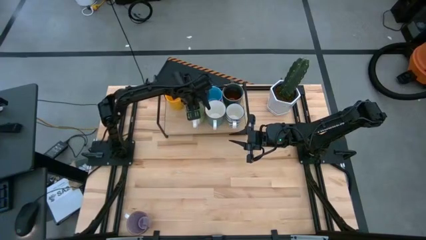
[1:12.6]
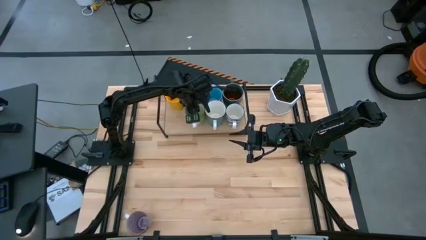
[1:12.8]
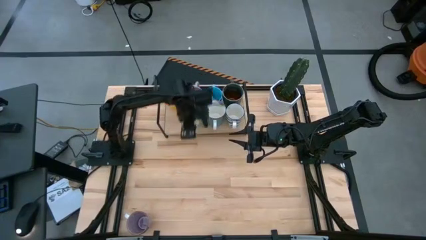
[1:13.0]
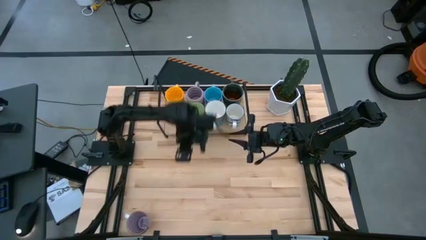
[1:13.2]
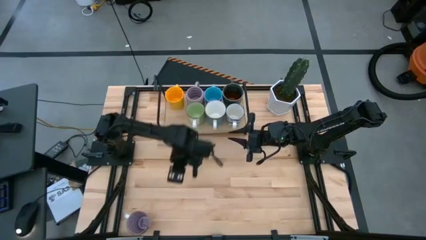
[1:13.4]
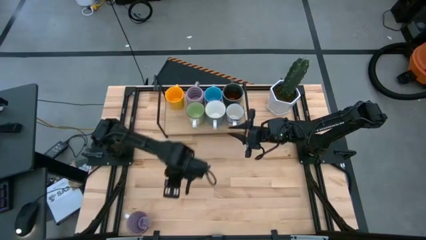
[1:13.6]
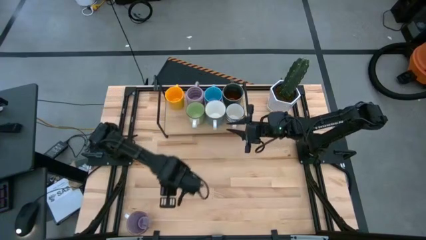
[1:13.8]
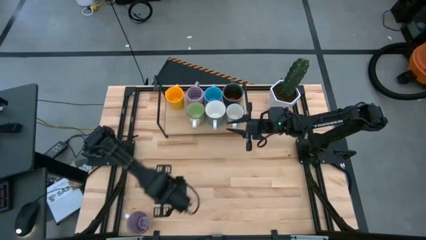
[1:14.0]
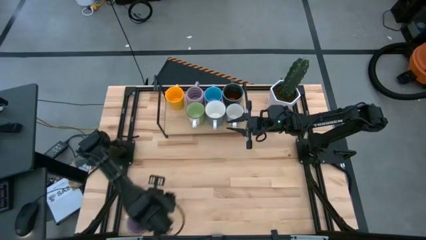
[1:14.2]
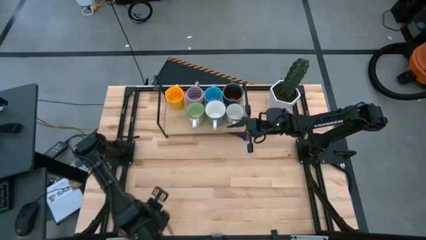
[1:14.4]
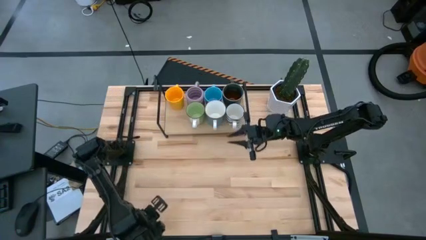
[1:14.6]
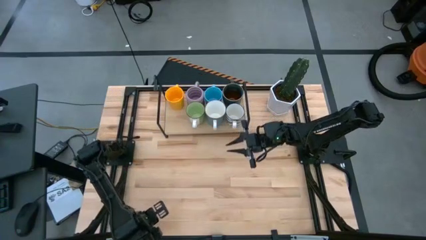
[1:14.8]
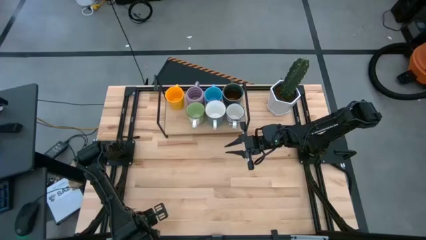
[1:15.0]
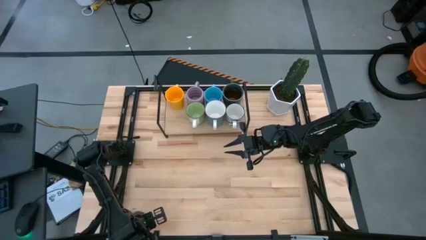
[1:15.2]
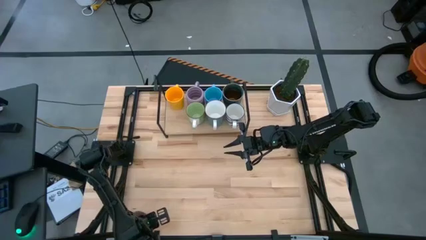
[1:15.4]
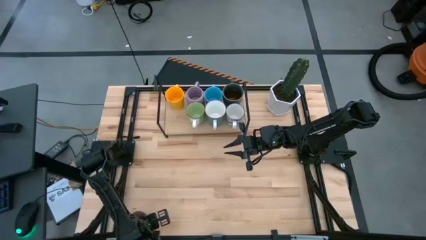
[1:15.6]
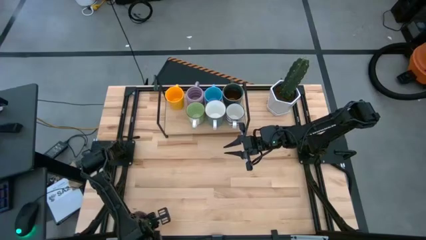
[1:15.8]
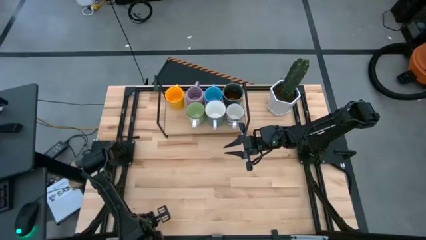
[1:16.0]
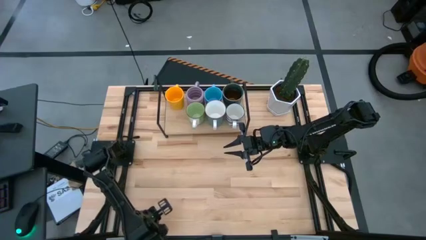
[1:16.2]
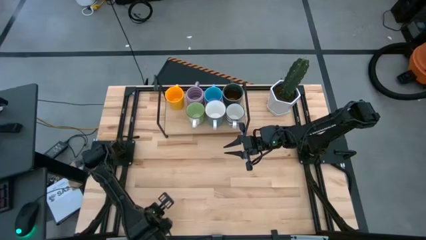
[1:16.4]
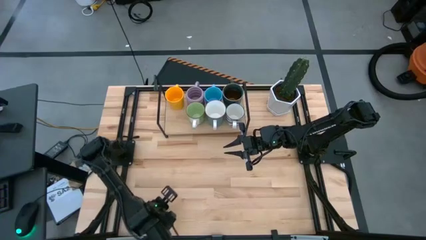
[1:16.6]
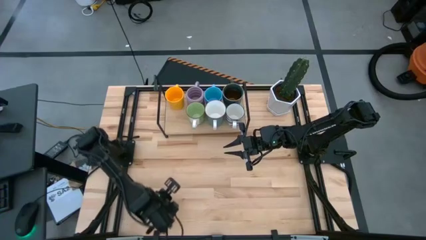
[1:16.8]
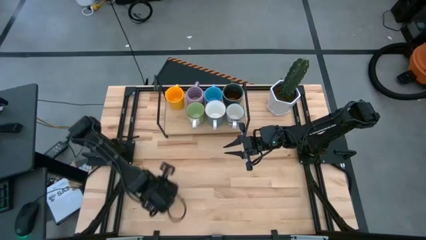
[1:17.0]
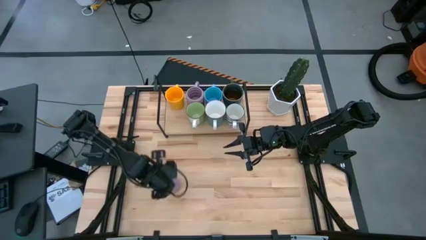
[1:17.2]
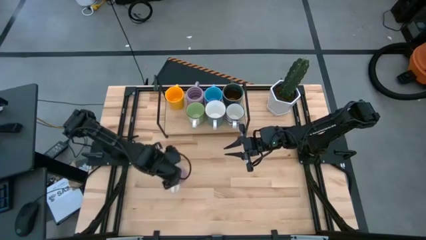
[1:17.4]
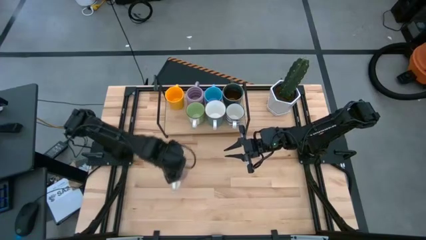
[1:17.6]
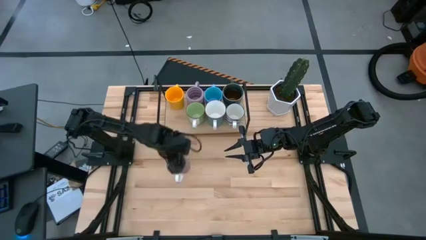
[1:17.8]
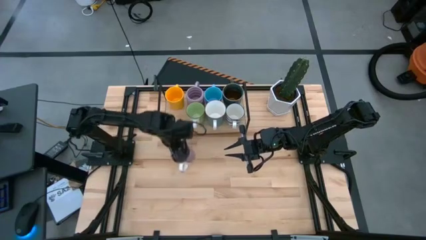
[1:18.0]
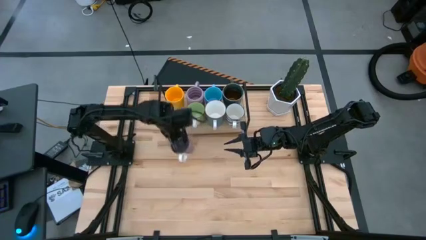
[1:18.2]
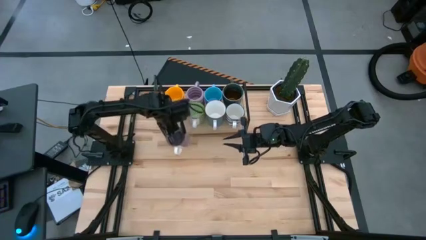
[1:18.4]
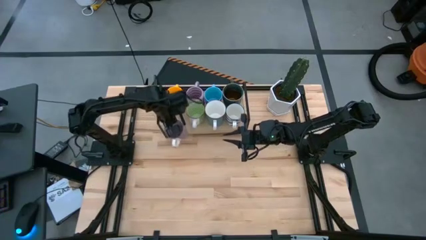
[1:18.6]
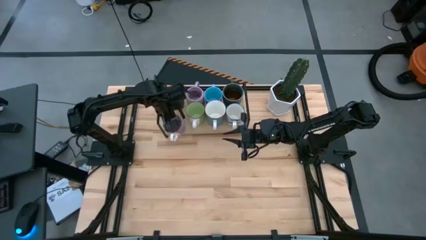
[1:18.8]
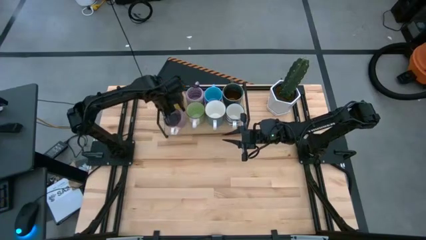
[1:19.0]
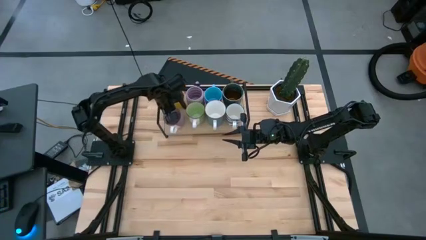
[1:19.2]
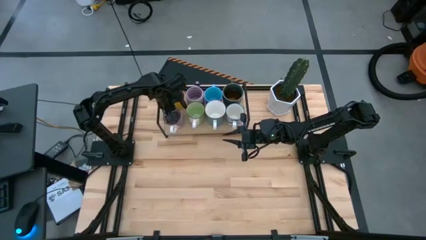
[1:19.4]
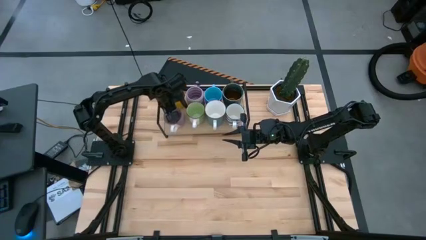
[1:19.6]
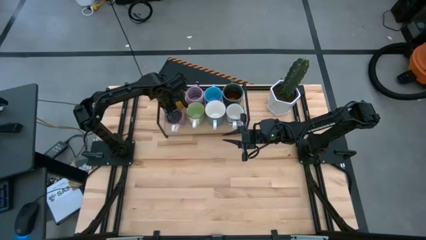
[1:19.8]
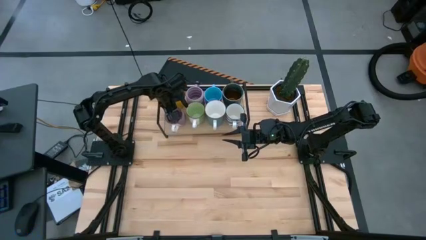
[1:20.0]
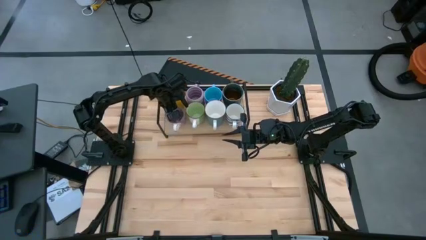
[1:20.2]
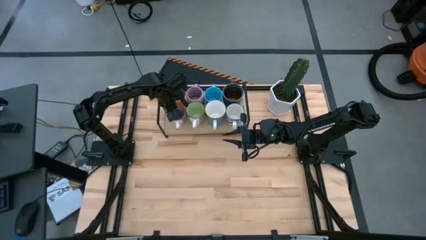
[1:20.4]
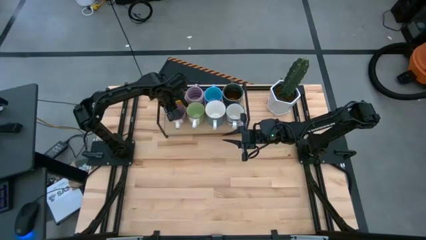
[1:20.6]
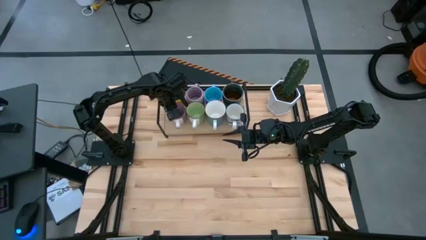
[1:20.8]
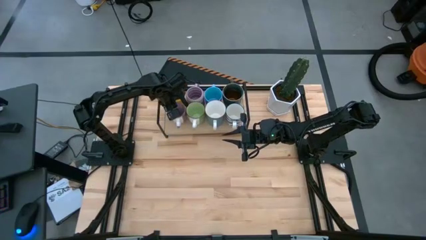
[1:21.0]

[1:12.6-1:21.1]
Task: Place coffee mugs
Put the purple mug on the shelf

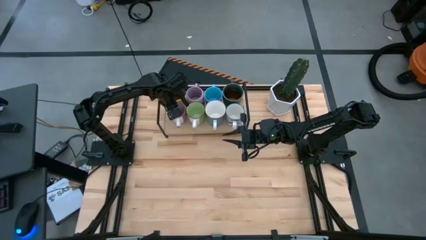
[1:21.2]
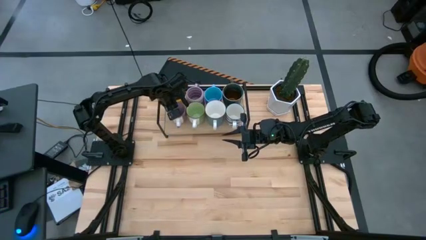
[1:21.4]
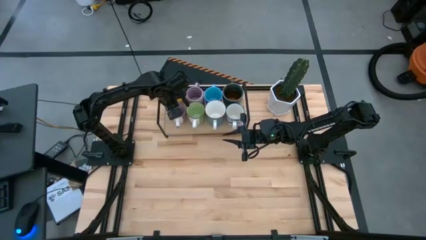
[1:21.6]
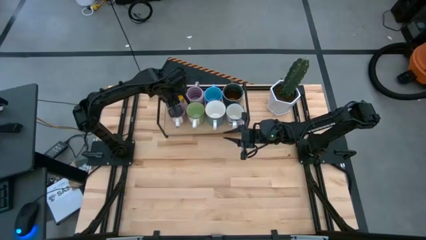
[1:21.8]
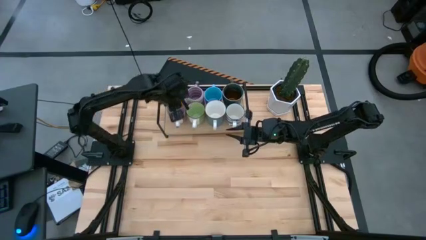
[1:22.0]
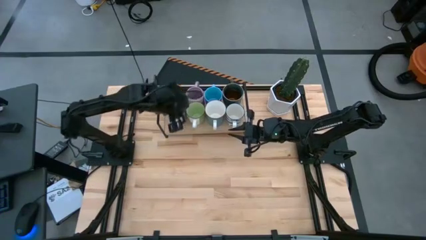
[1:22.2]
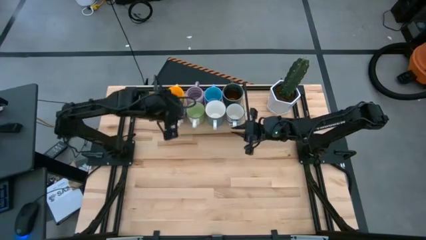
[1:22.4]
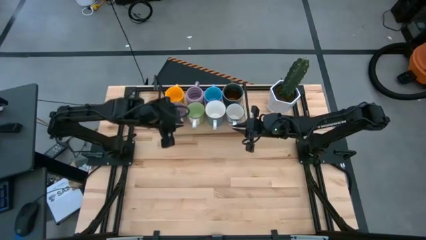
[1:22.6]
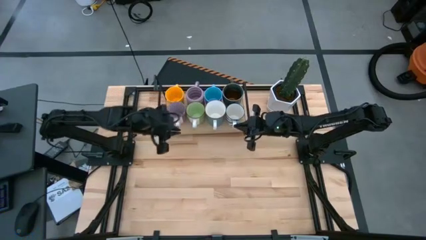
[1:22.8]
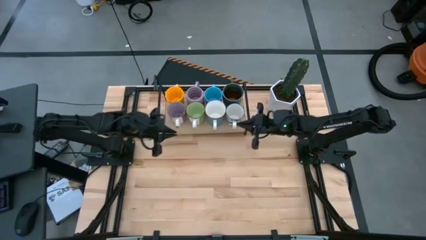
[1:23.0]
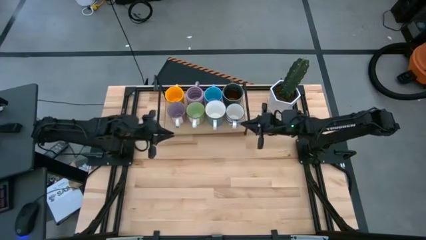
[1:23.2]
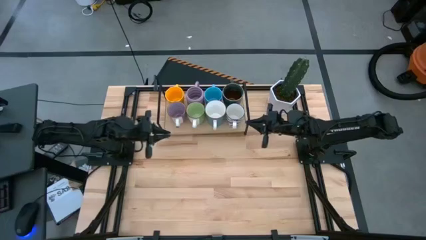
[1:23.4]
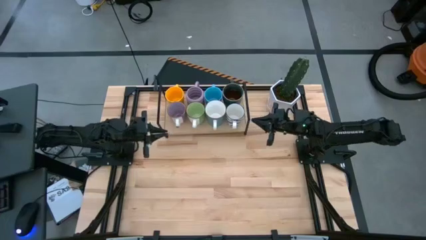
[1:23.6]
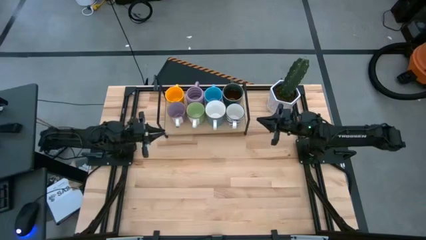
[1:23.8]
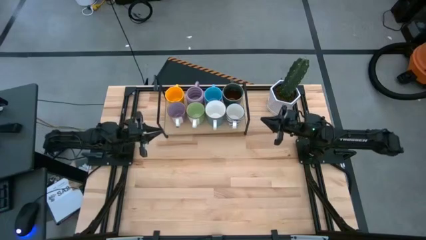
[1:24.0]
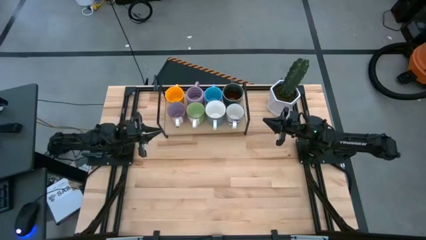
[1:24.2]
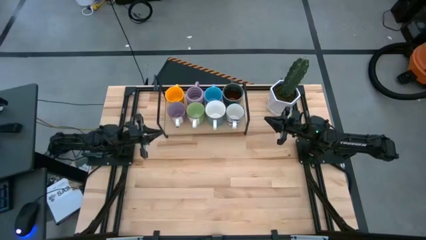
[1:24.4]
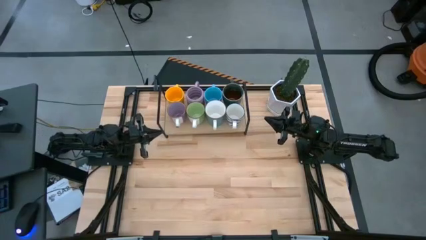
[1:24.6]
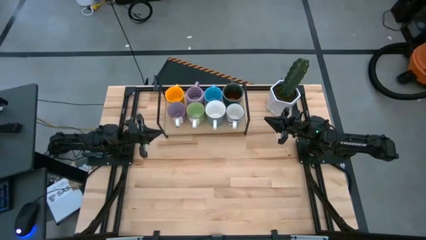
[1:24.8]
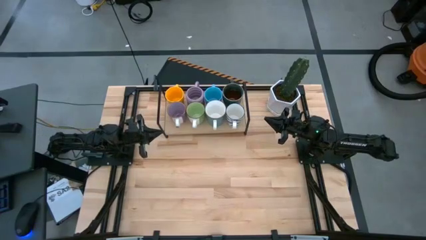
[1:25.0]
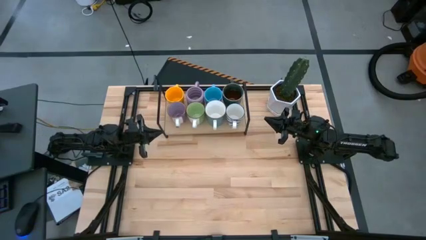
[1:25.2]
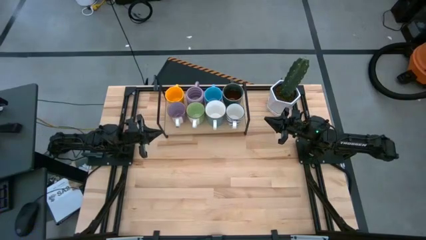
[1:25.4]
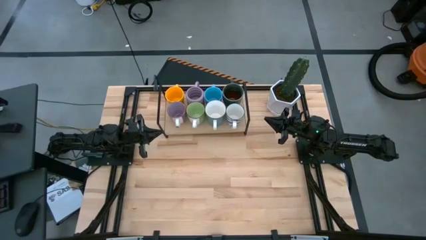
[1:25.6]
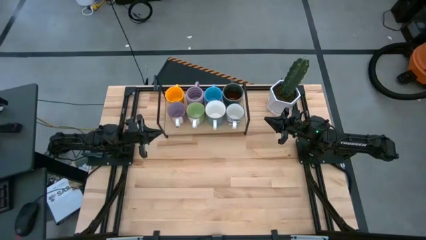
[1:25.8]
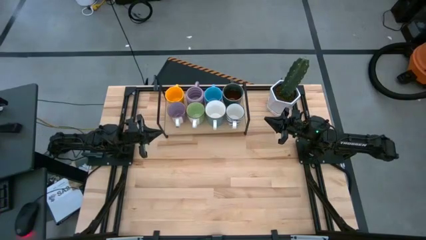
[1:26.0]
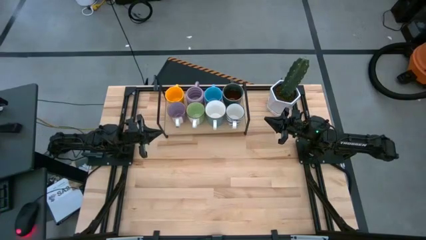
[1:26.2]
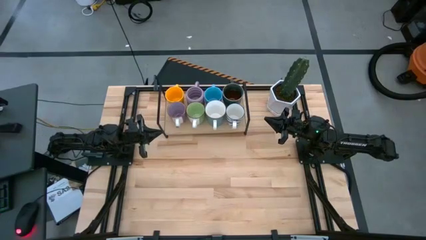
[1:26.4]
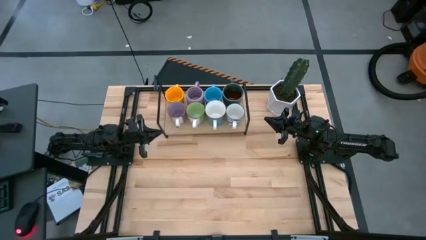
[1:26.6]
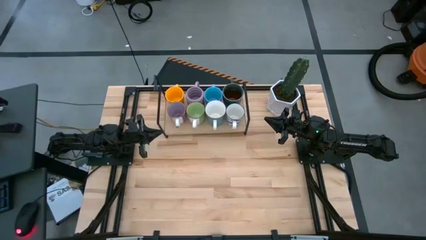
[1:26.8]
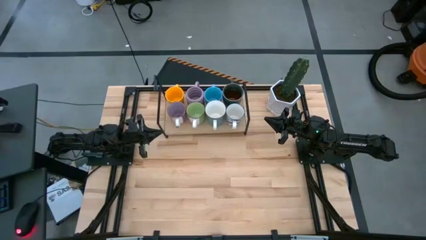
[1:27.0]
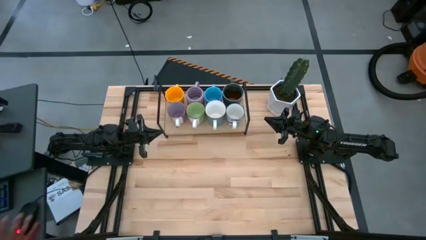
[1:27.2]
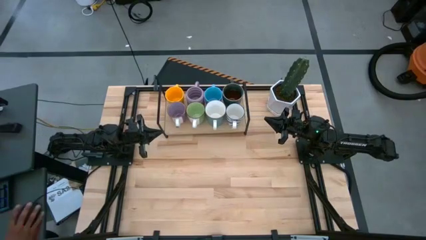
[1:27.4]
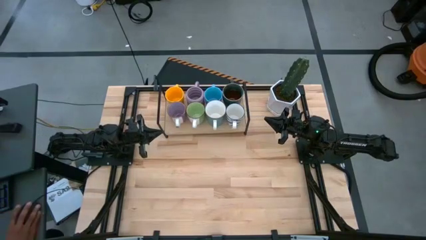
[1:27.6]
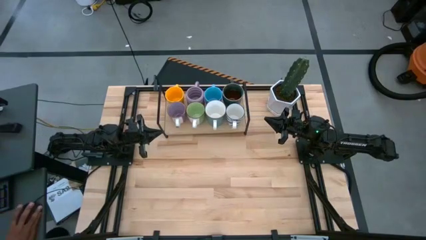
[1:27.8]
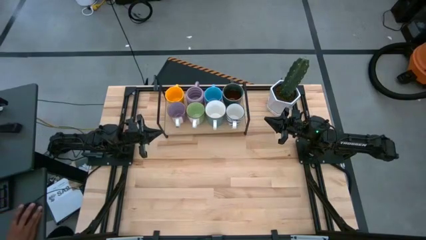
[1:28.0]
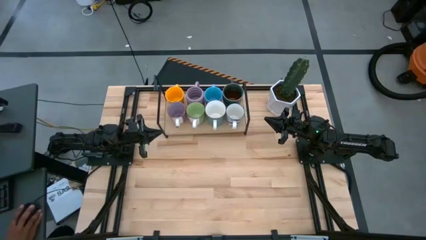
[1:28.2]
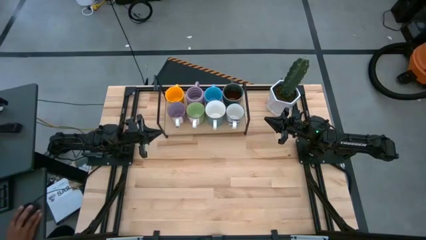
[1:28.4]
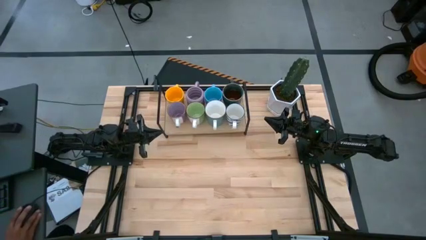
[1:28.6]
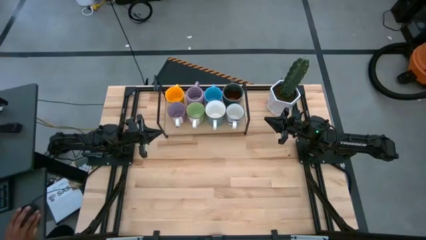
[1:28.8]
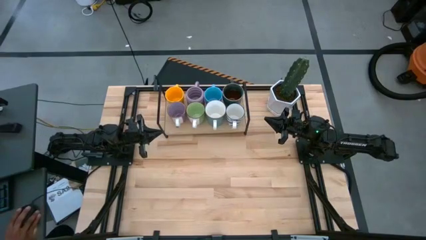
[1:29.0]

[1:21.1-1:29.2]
Return to Home Position
